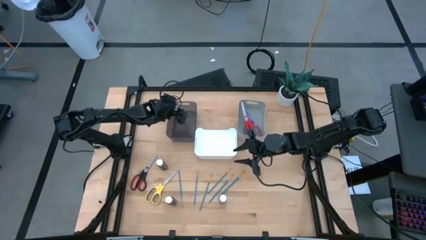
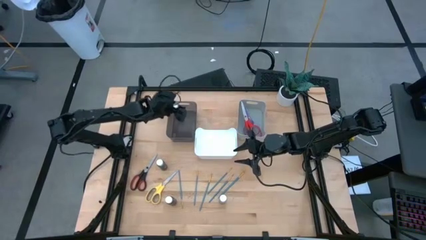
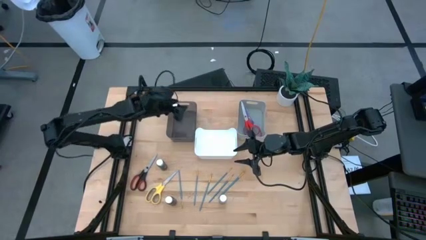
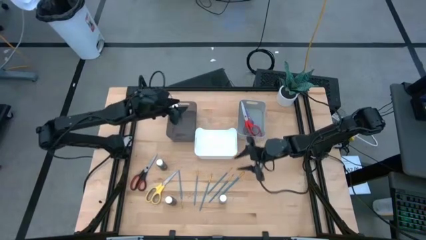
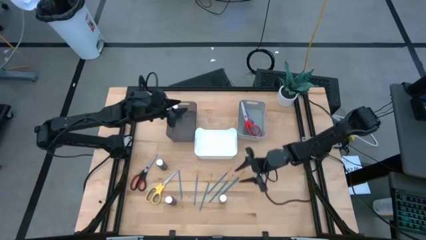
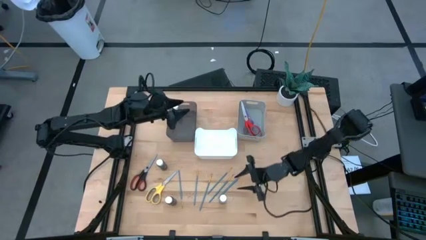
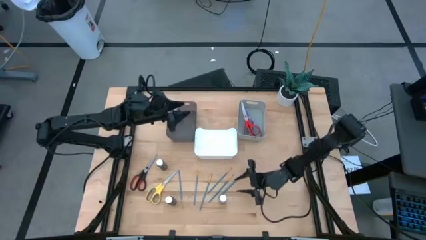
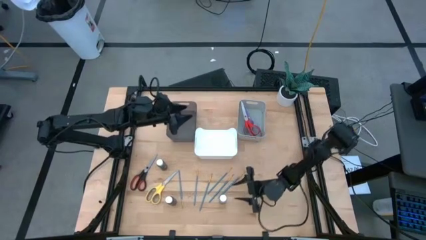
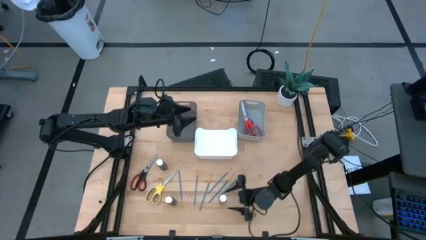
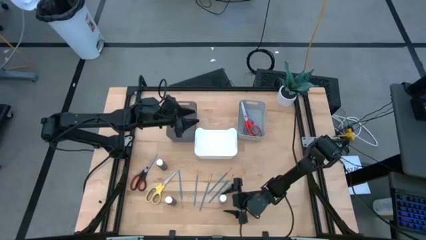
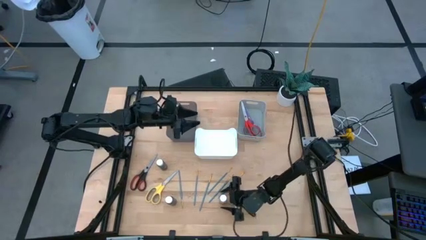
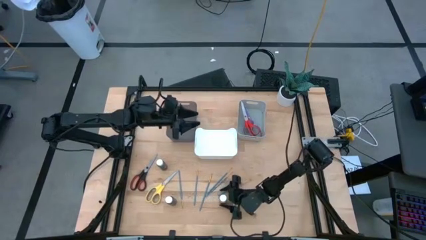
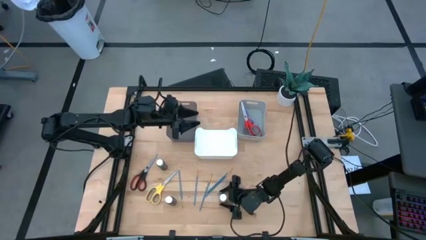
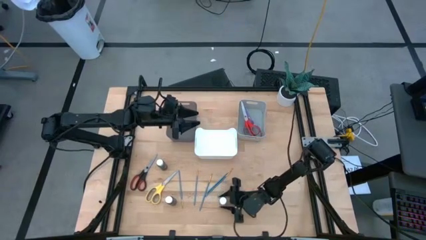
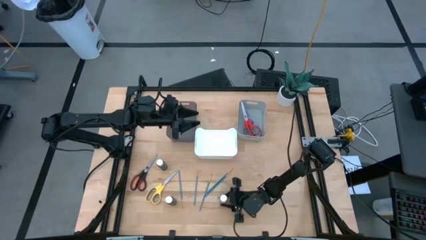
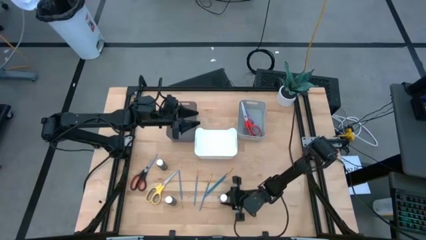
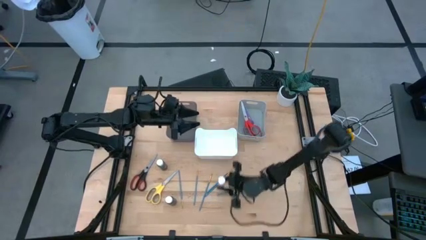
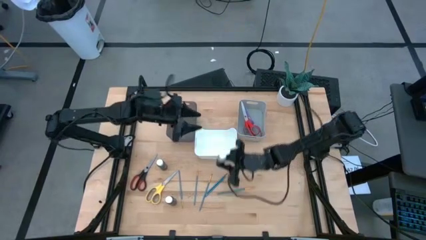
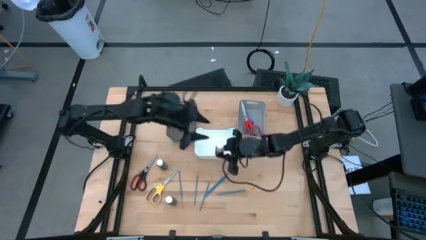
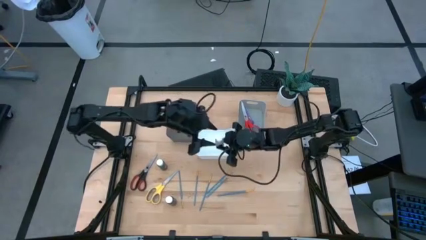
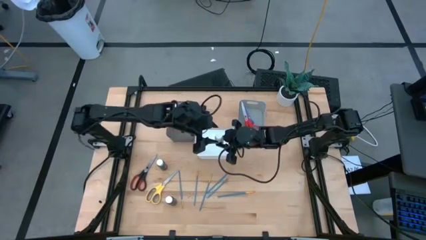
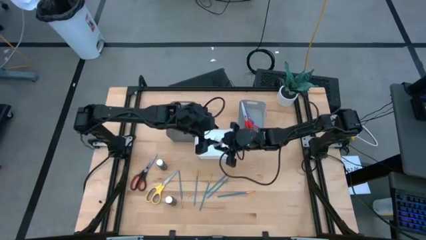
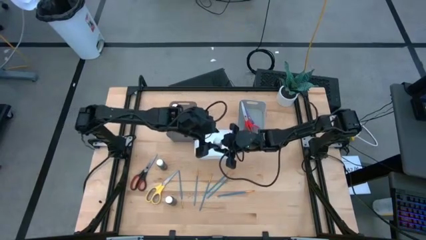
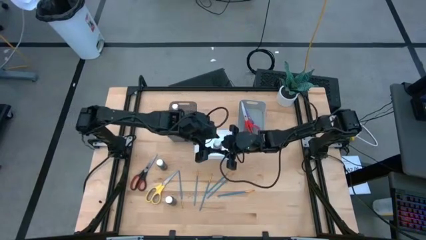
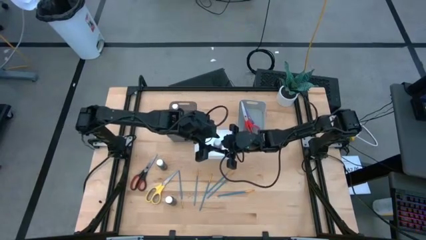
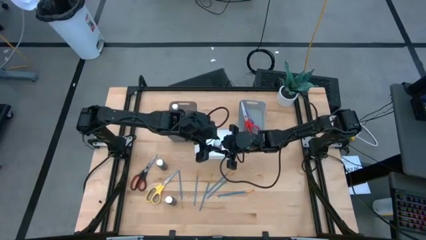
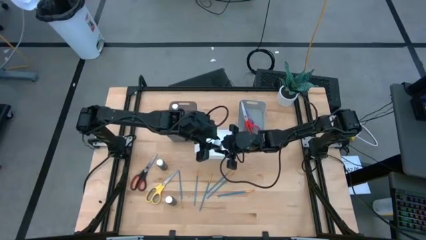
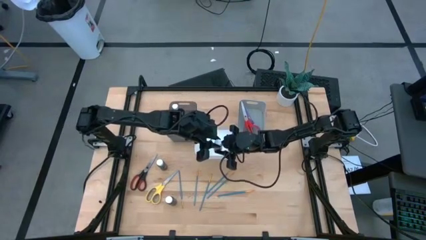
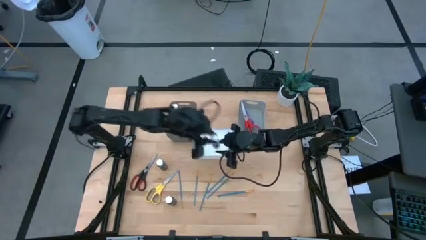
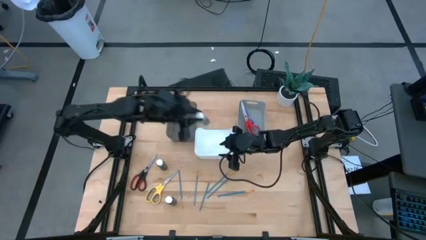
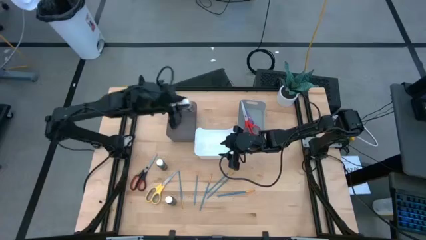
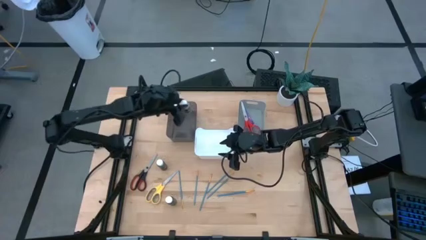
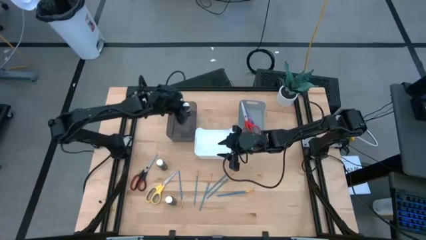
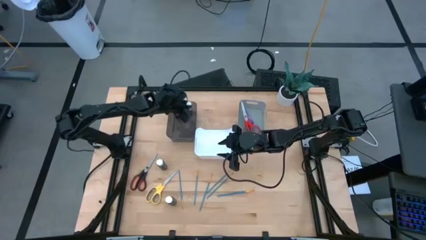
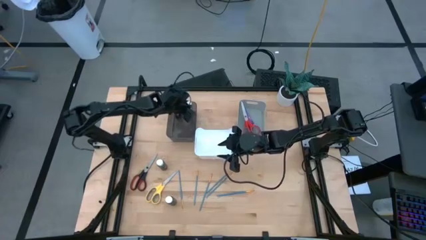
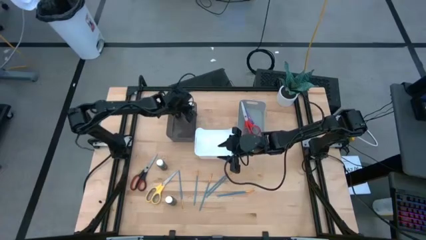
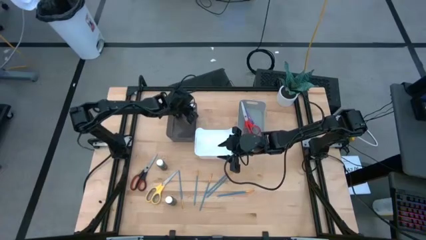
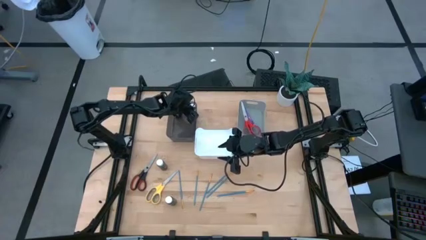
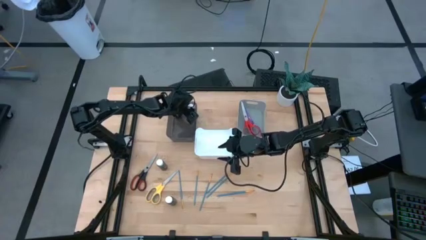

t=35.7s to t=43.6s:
Task: Pick & Place Paint Supplies
Put the gray paint bottle into the black bin

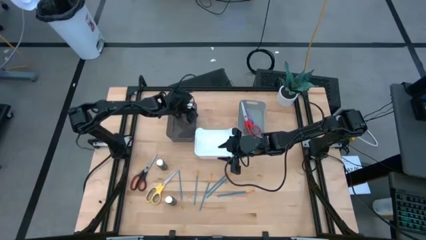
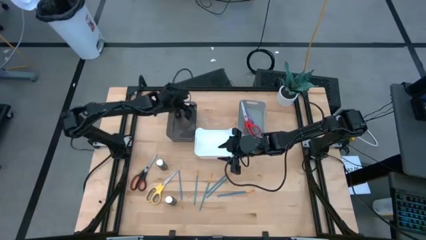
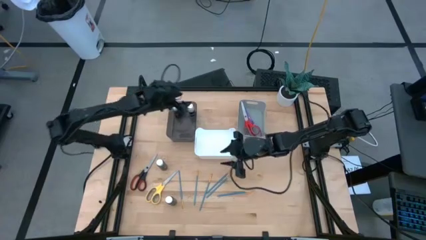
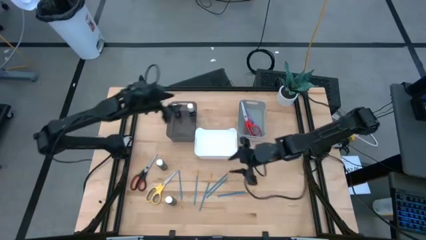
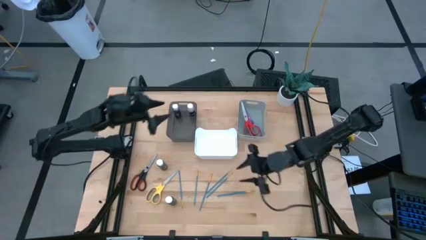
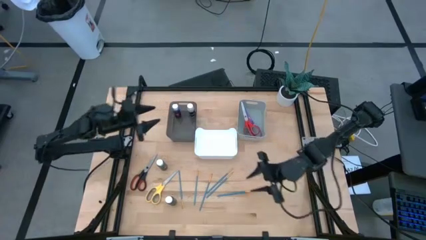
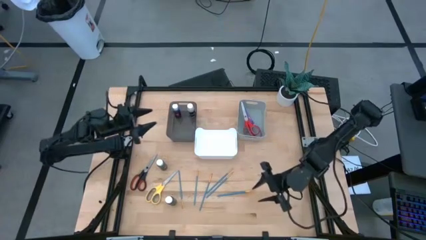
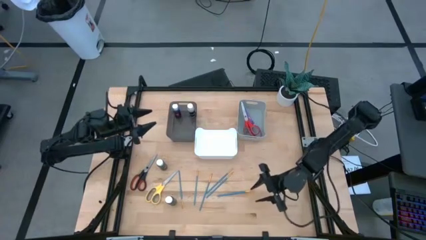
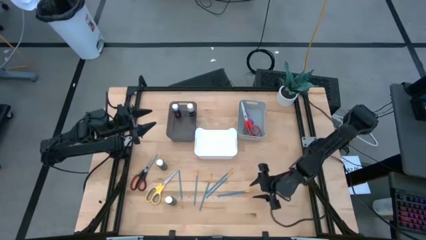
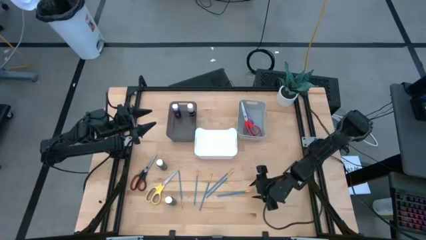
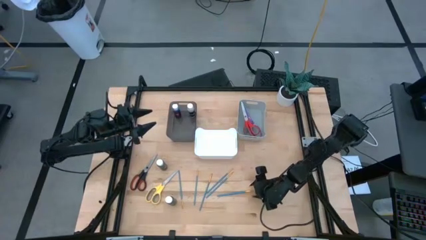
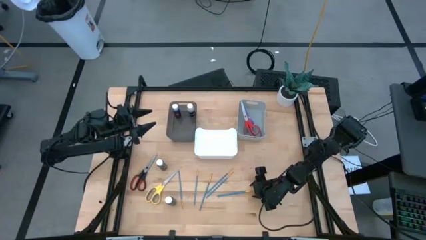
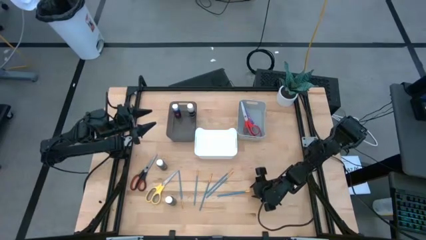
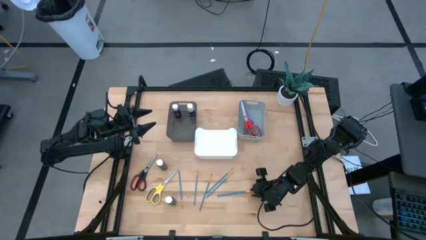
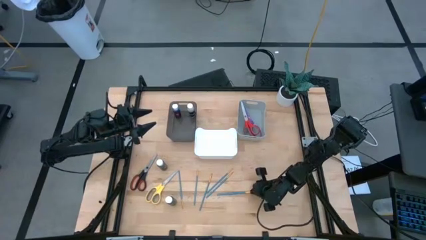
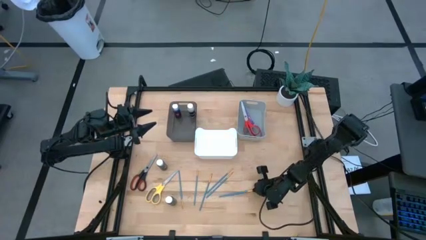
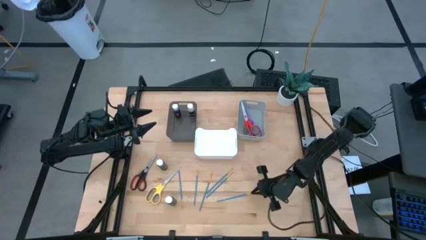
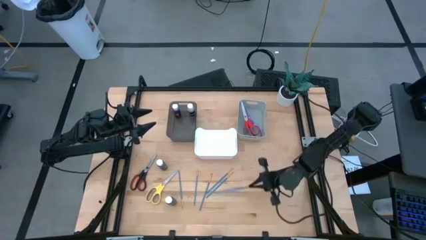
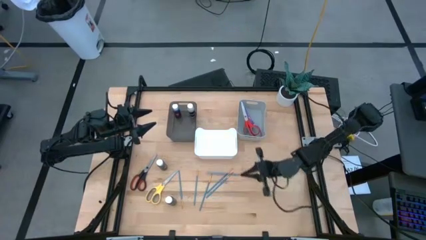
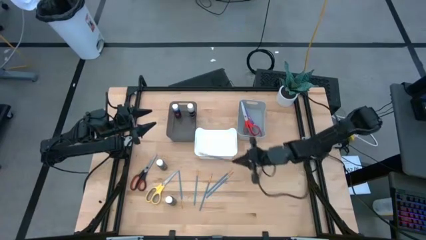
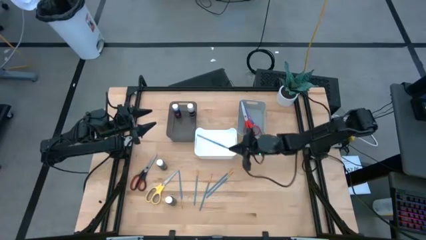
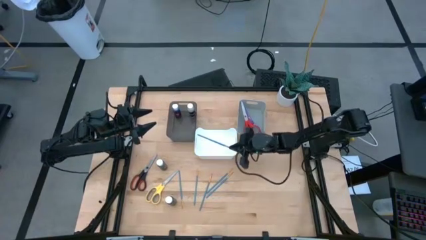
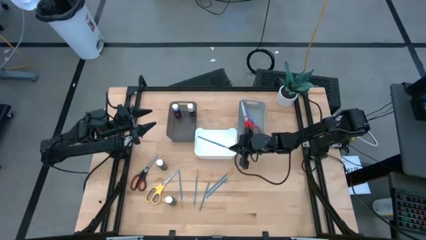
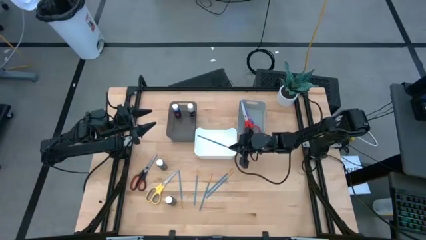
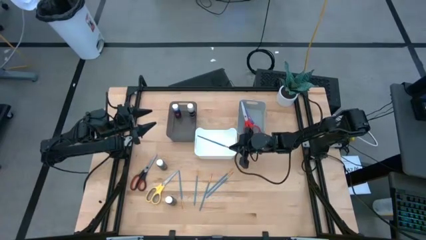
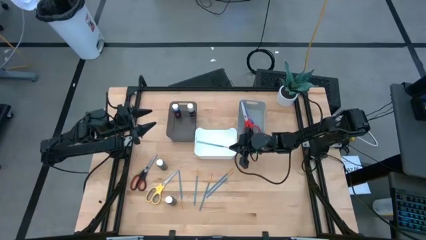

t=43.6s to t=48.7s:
Put the blue paint brush into the white bin

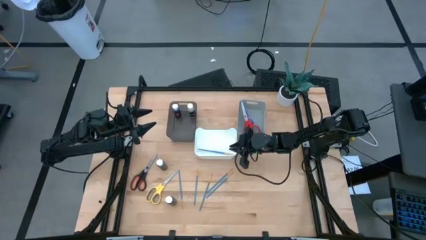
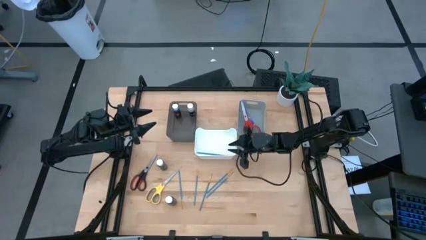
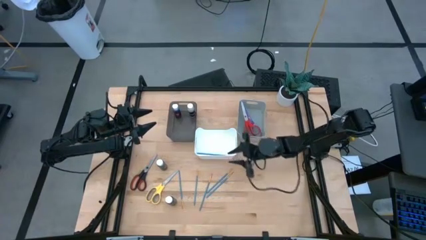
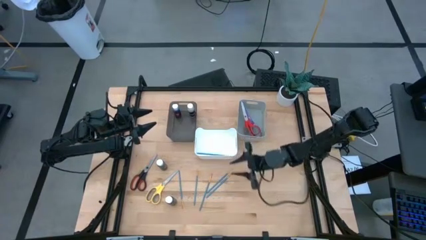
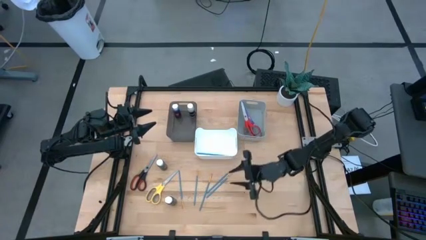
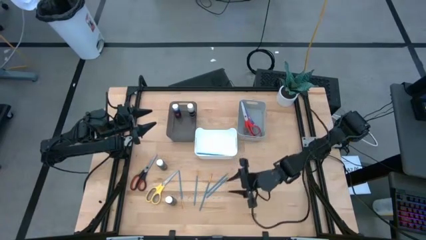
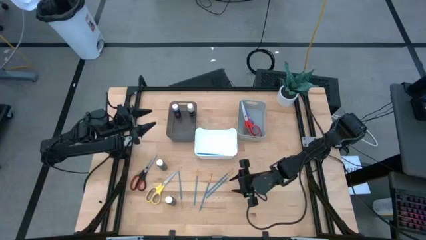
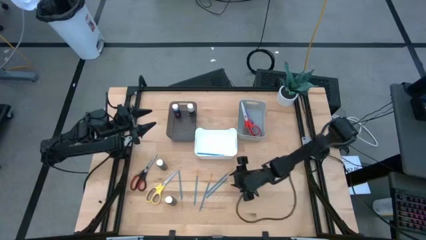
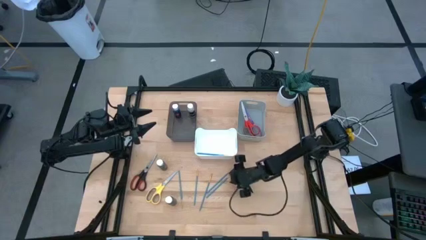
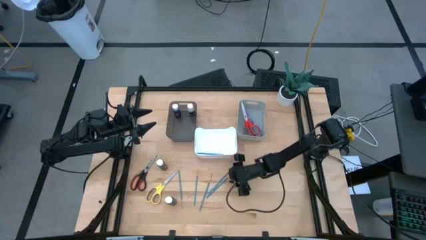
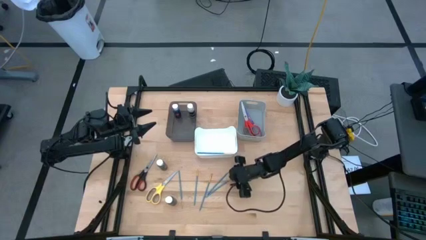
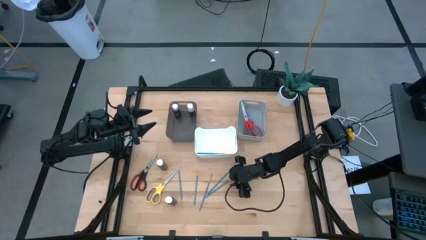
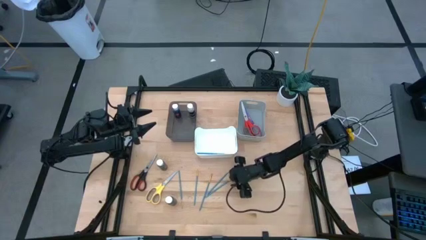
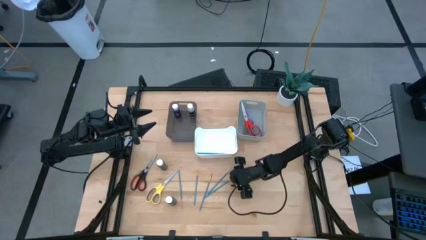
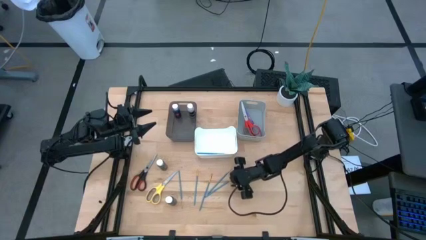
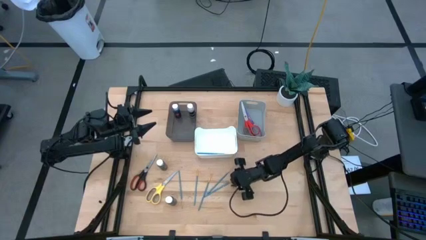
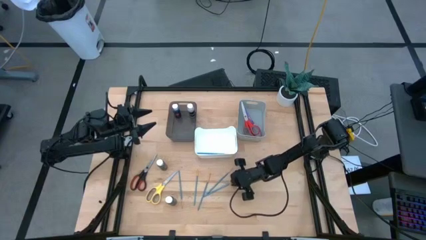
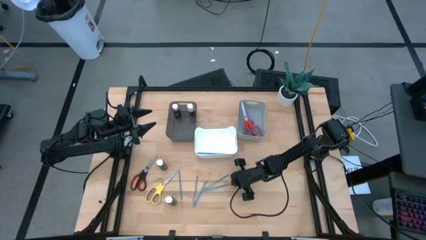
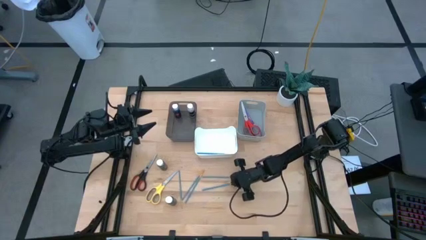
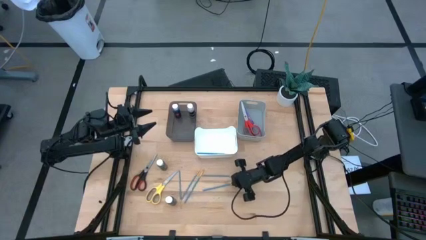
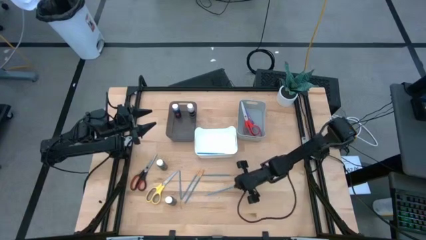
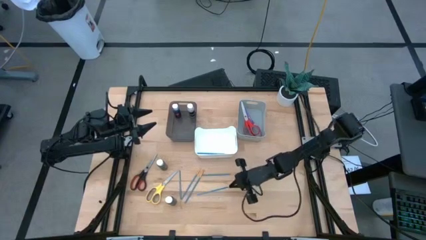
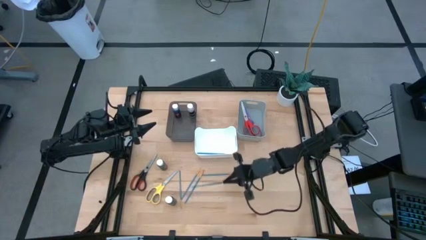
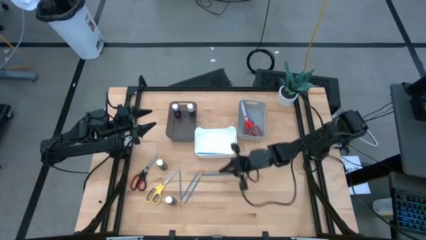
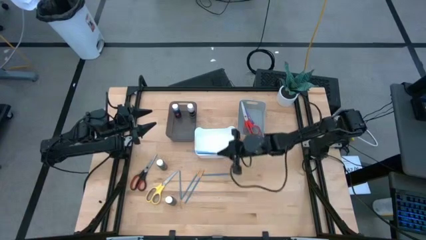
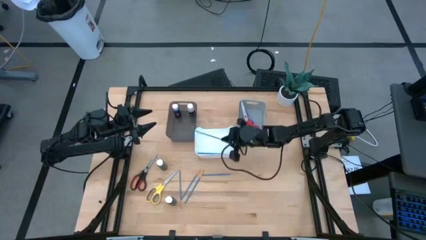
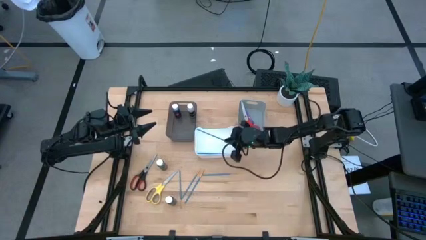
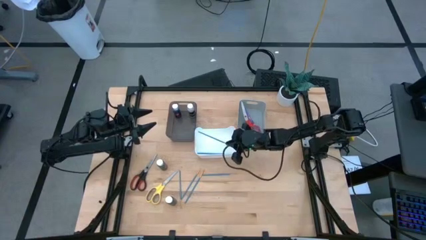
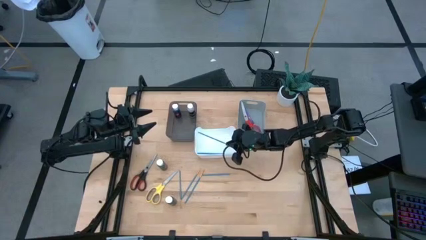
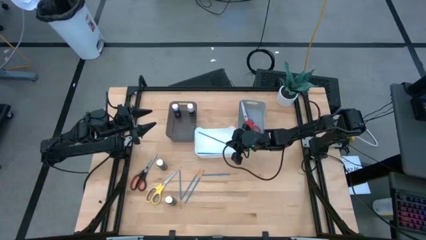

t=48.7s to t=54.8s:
Put the blue paint brush into the white bin
